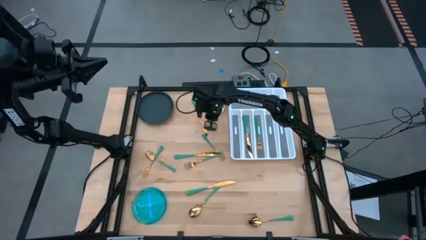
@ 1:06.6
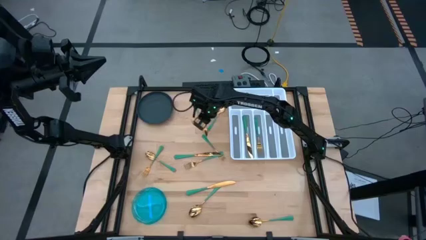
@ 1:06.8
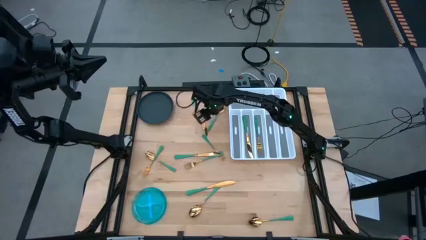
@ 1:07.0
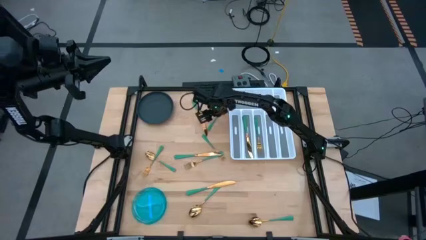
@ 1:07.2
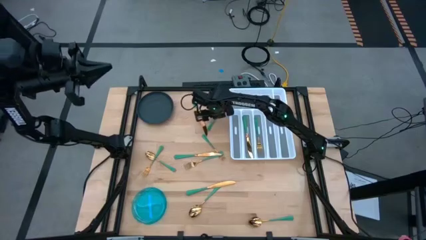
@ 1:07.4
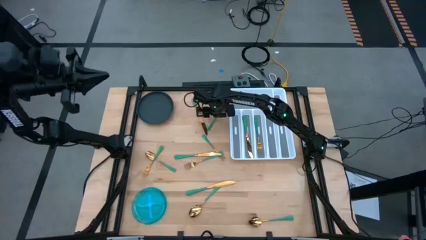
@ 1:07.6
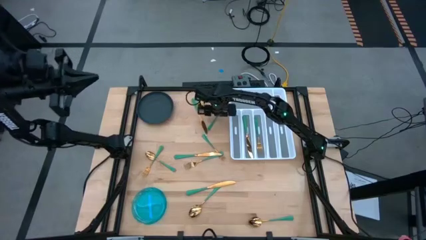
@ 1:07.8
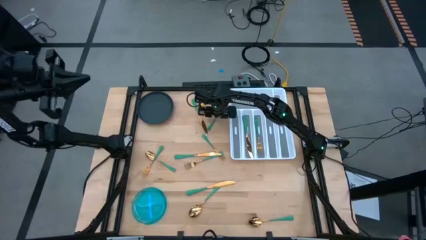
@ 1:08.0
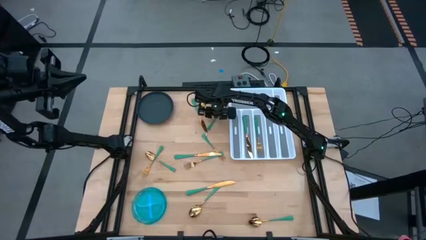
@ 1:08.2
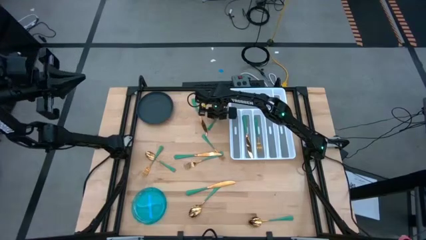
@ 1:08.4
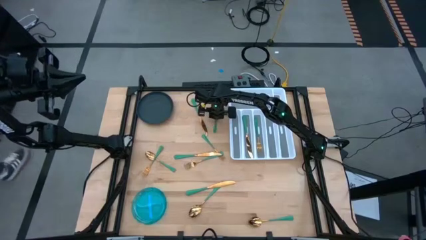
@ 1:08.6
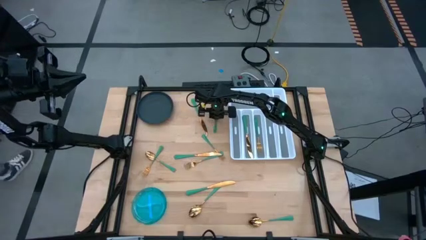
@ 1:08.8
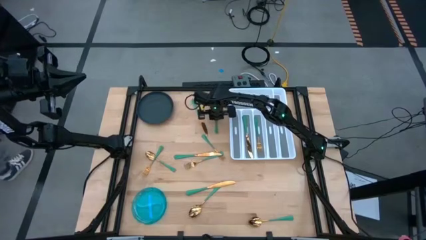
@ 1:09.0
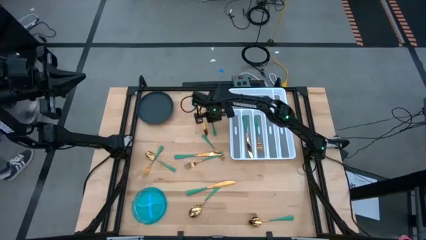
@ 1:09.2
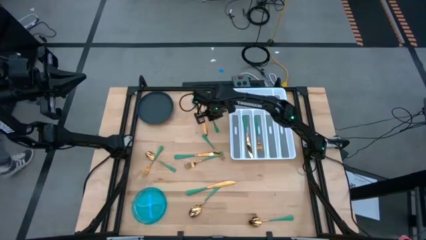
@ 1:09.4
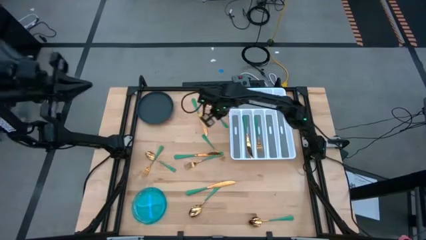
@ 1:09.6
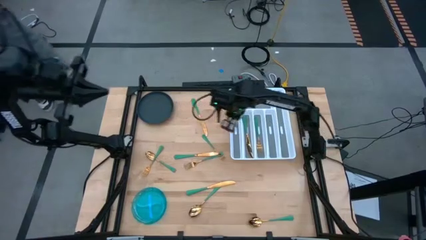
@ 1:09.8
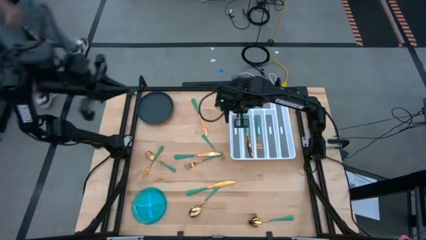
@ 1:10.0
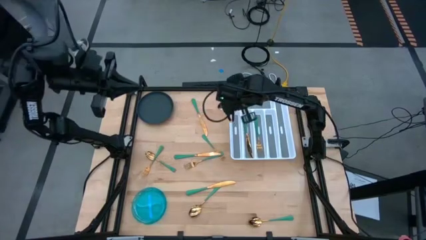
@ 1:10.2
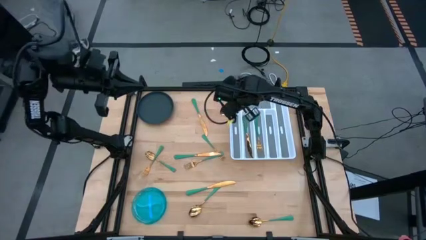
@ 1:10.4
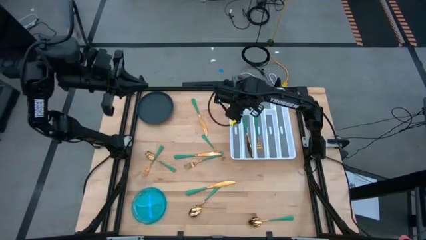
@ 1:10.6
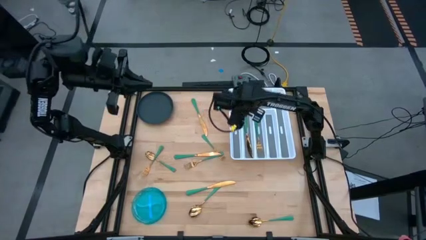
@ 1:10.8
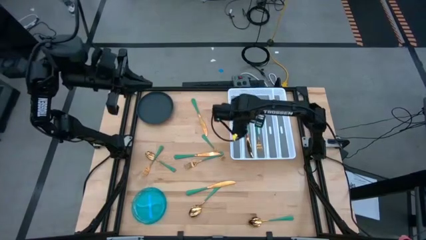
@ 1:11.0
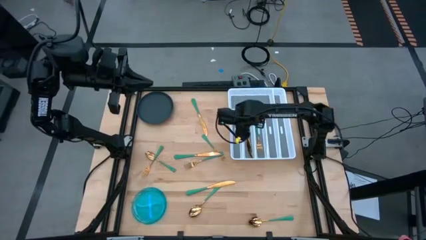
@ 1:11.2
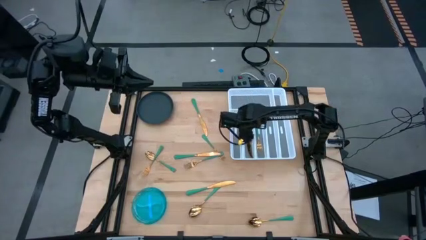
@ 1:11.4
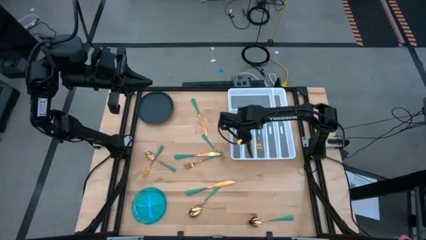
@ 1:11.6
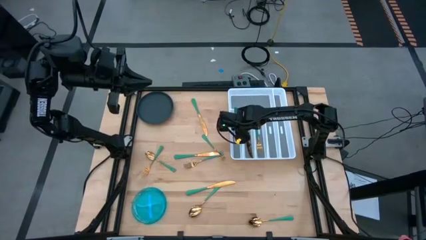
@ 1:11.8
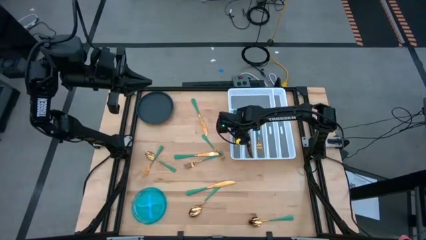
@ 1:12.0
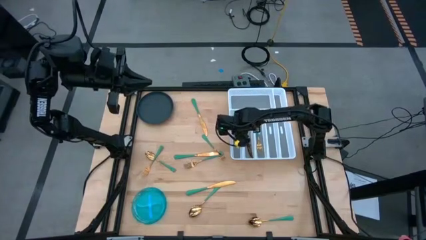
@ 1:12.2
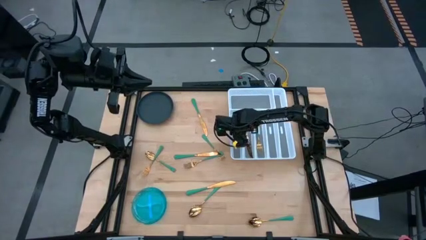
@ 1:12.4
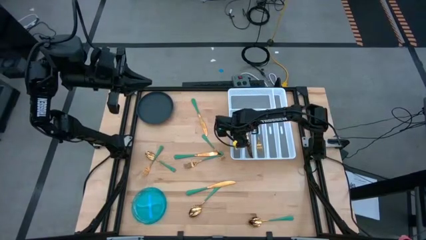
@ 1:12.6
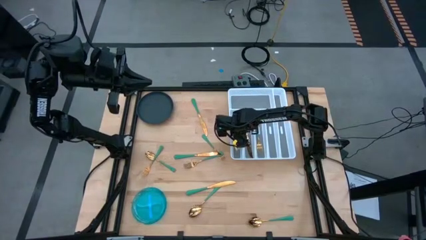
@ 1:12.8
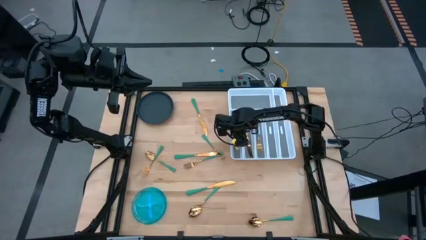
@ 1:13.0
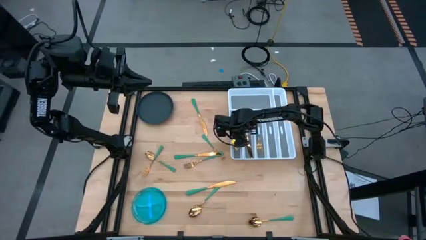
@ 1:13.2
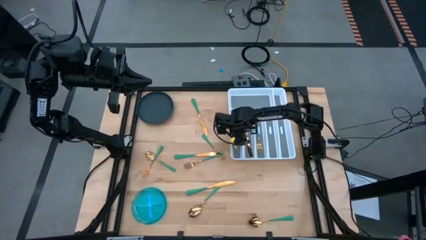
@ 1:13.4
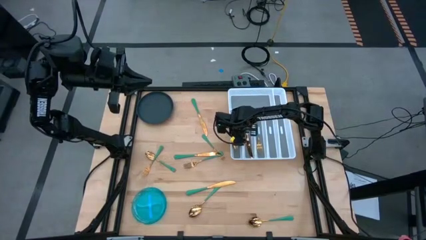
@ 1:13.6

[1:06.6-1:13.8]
Task: Sort silverware
Put the top center green spoon into the left slot of the white silverware tray

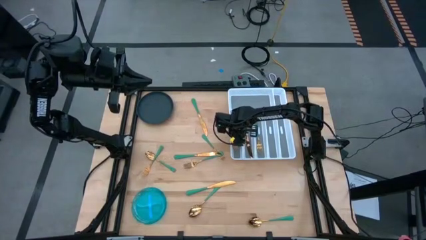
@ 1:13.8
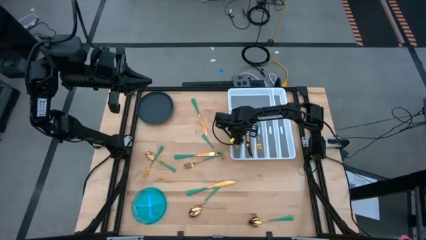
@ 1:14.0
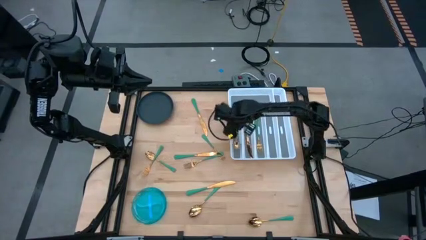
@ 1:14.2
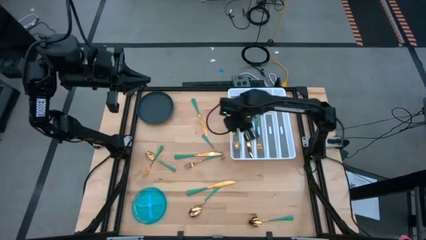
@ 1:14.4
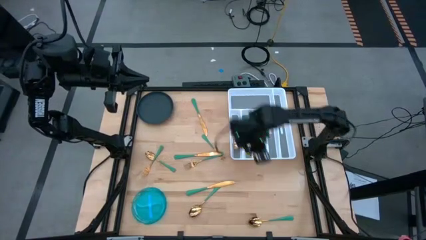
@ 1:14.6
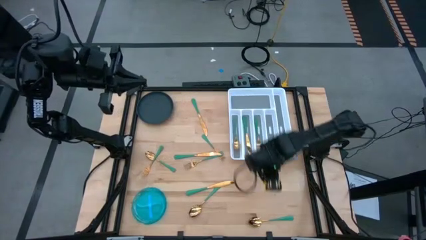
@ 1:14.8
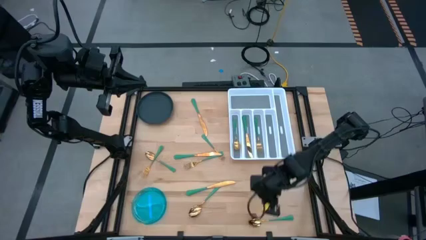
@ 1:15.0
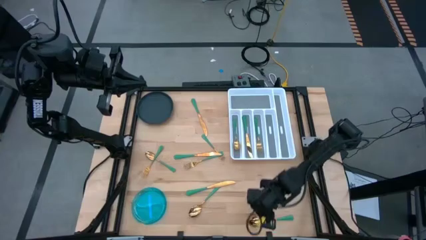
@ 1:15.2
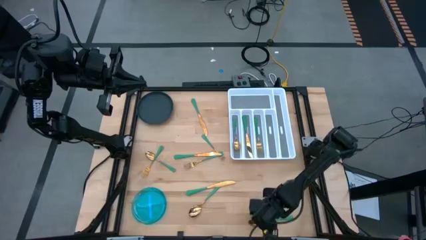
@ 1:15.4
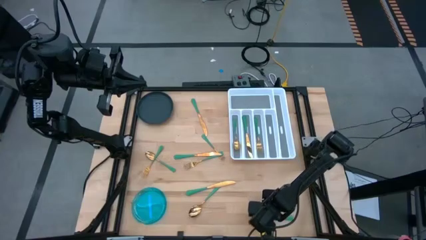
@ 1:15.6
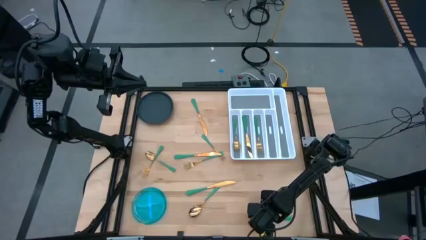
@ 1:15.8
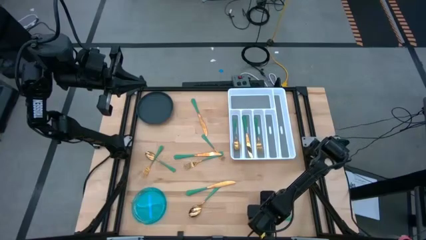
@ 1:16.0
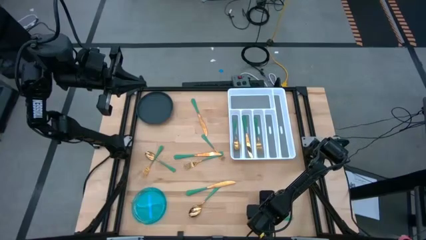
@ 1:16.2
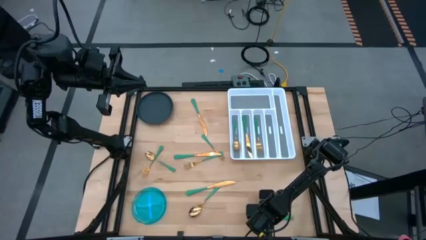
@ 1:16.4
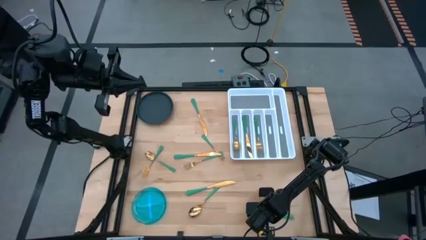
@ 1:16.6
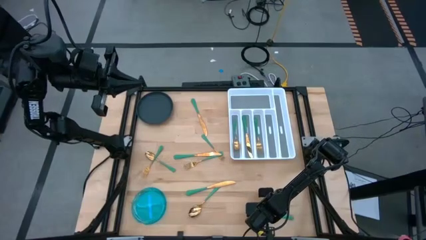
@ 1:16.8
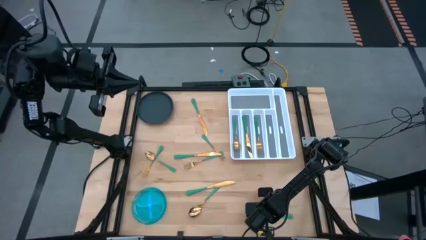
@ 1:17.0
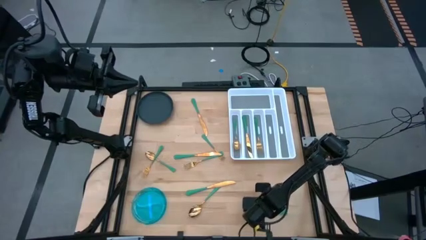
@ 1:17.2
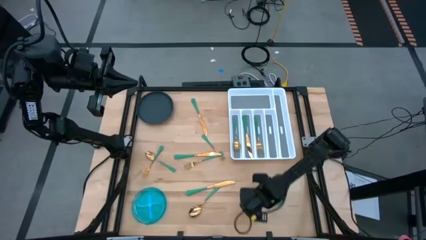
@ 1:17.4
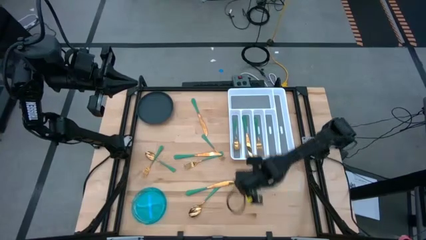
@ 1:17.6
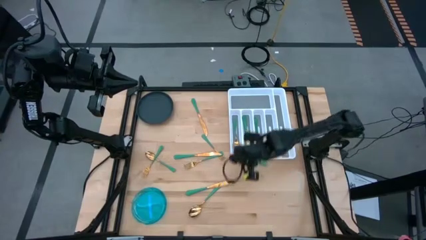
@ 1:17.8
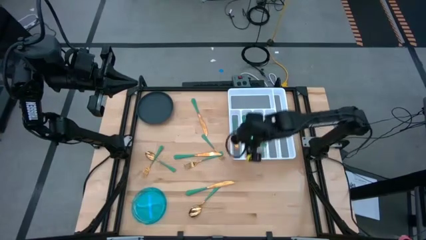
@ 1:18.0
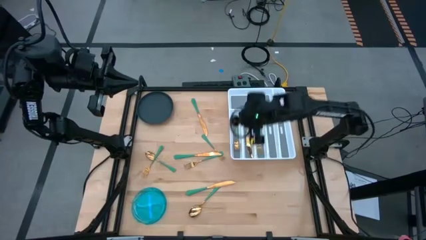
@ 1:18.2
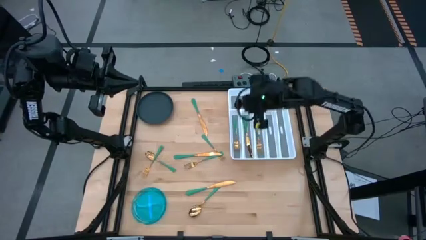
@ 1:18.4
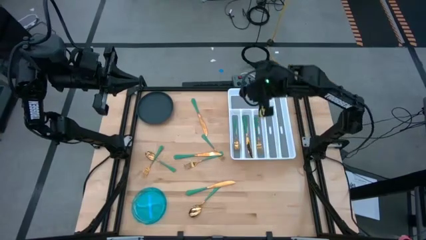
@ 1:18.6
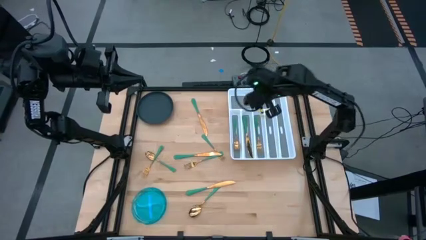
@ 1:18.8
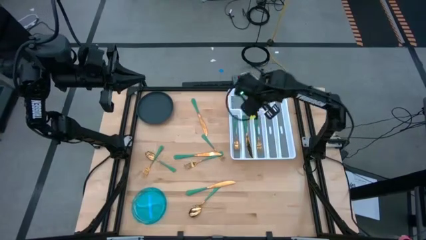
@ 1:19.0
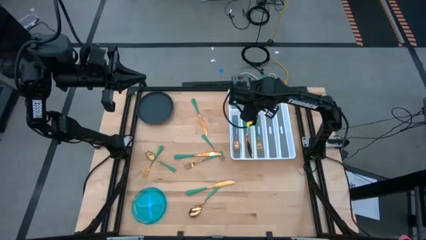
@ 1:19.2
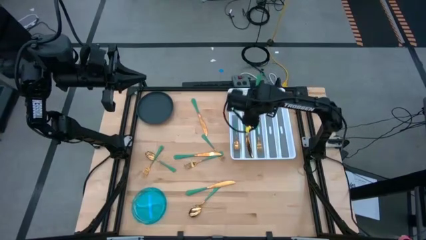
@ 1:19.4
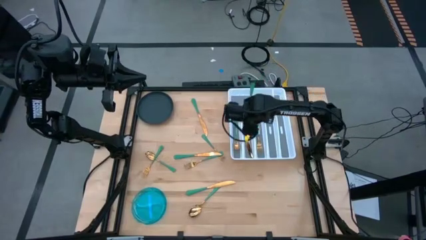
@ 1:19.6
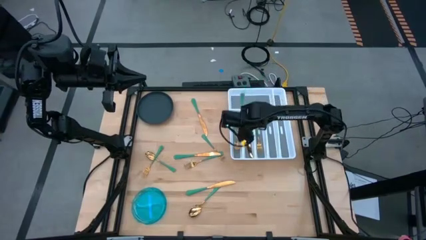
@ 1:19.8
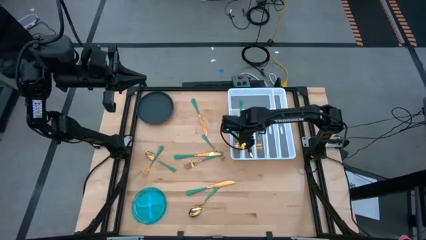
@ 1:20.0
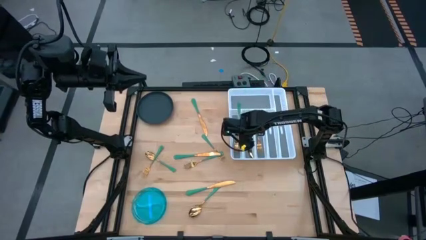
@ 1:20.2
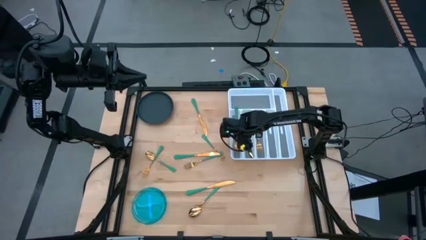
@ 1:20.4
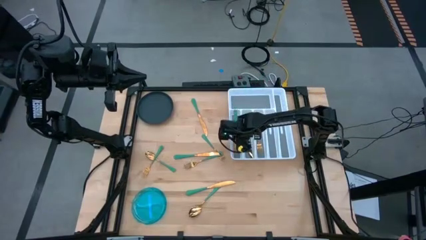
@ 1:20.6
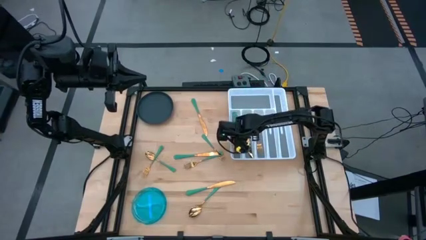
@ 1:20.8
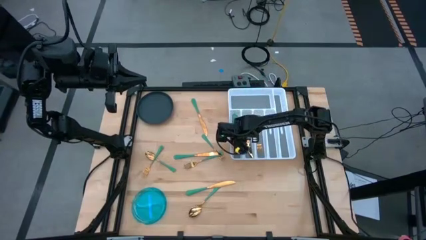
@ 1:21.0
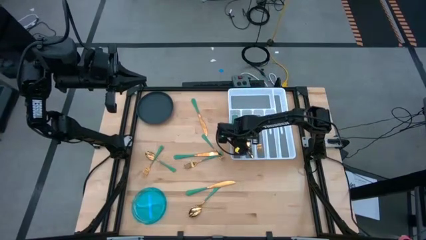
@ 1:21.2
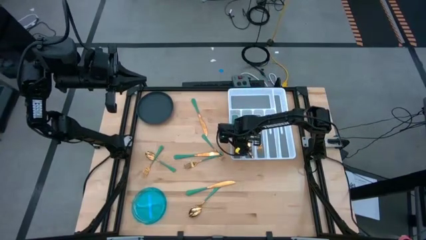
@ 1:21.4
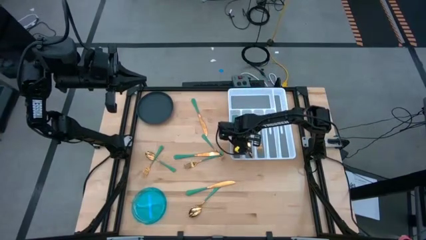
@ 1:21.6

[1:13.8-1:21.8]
Put the bottom right green spoon into the left slot of the white silverware tray
